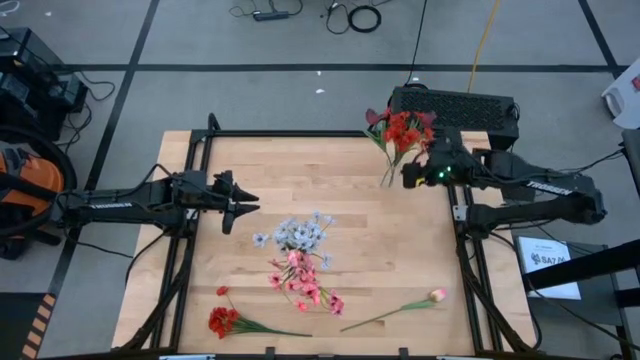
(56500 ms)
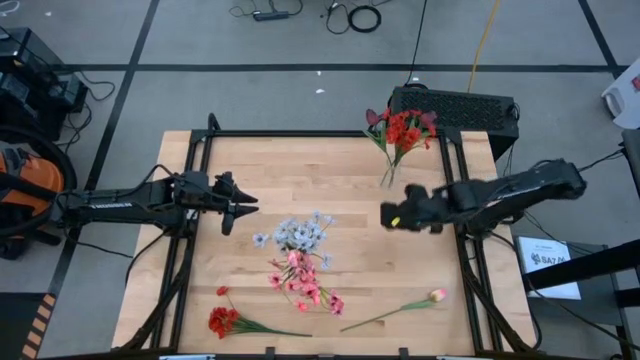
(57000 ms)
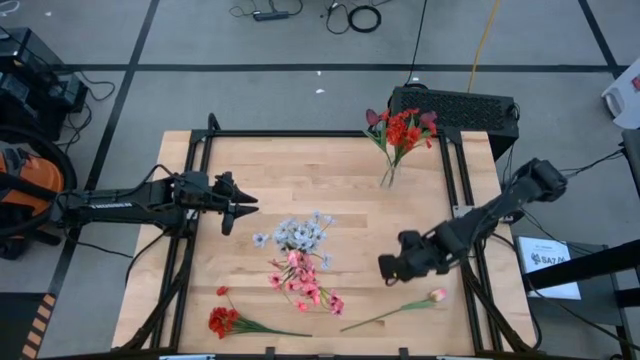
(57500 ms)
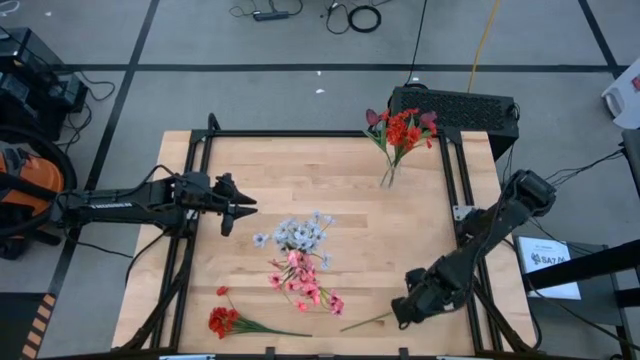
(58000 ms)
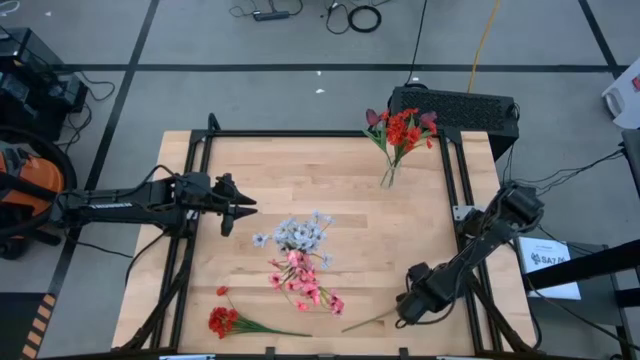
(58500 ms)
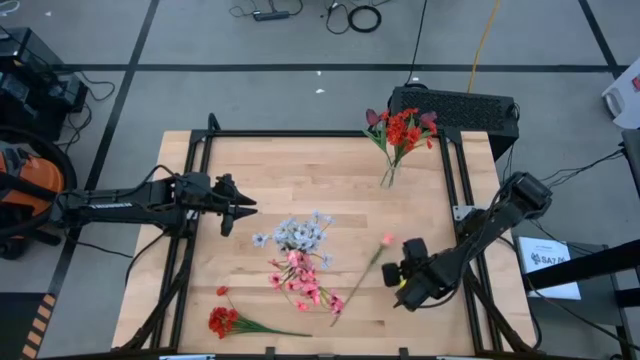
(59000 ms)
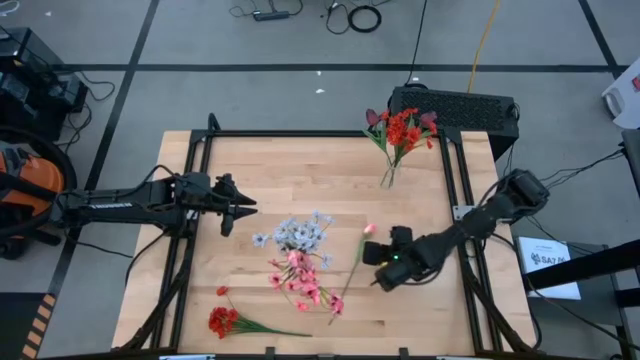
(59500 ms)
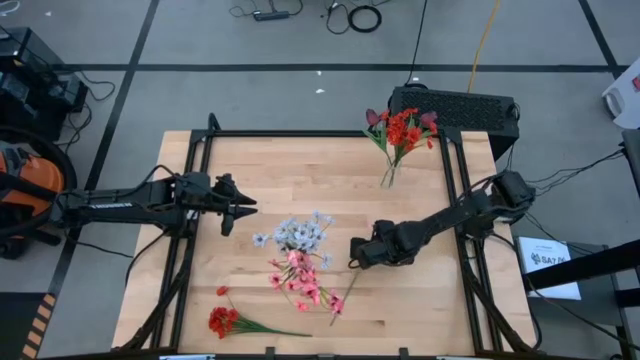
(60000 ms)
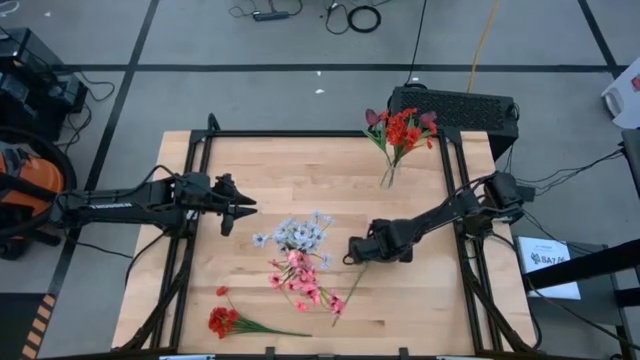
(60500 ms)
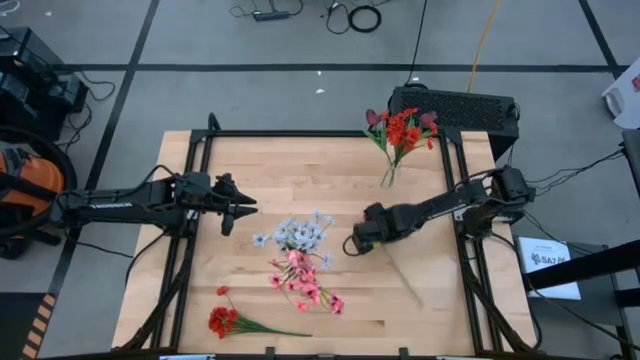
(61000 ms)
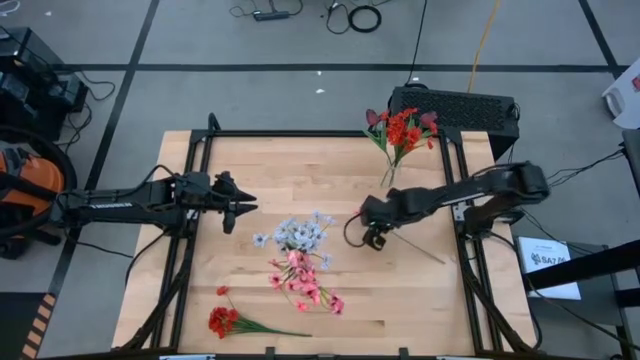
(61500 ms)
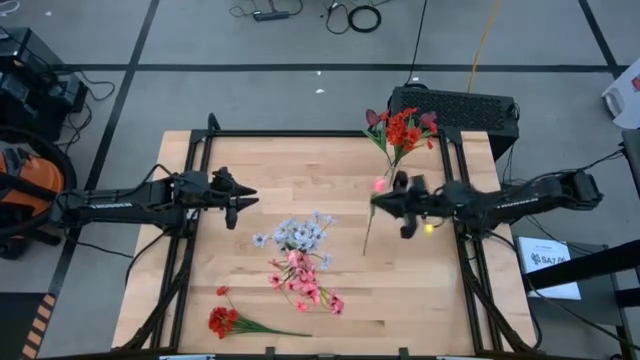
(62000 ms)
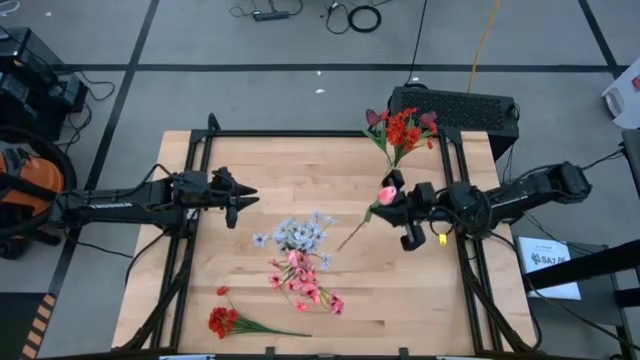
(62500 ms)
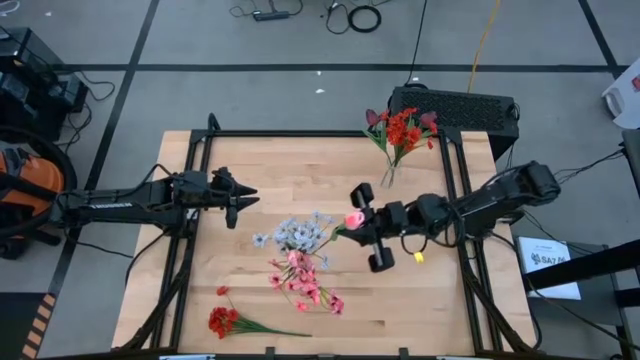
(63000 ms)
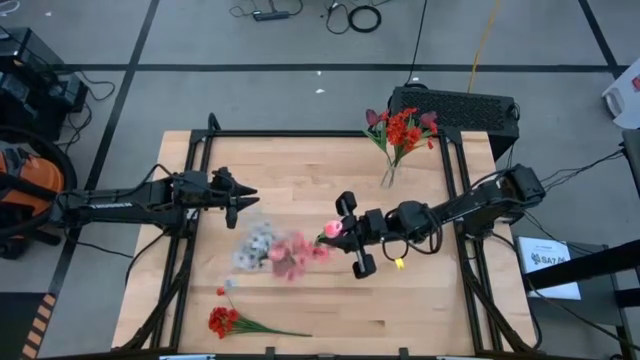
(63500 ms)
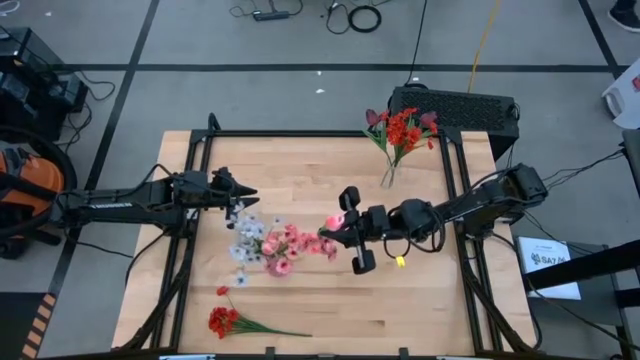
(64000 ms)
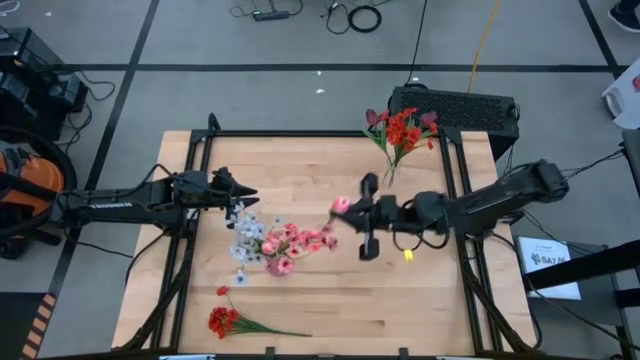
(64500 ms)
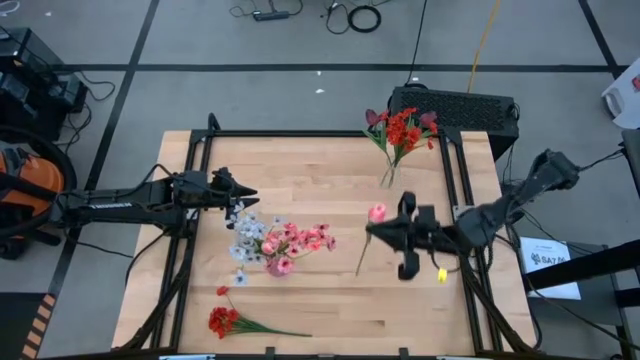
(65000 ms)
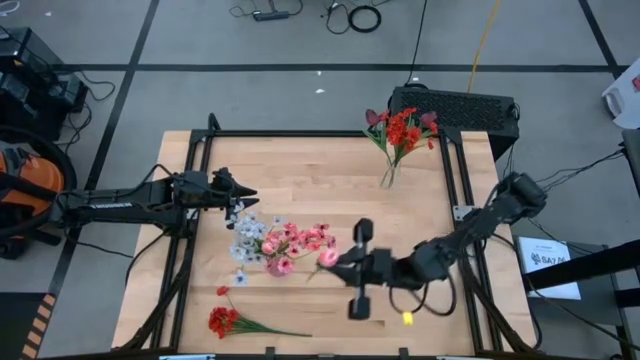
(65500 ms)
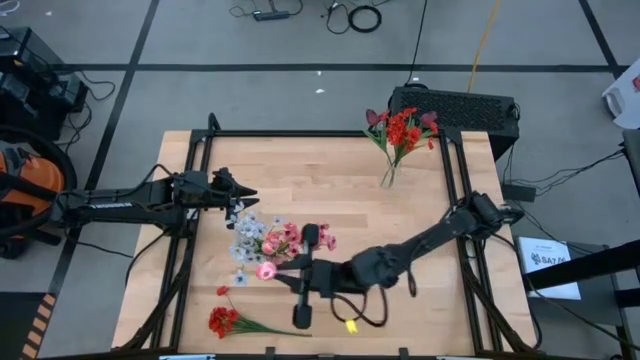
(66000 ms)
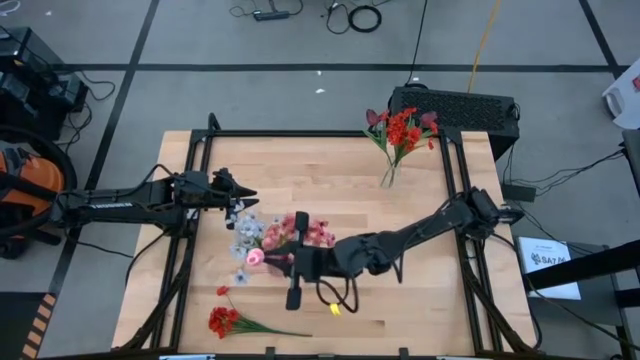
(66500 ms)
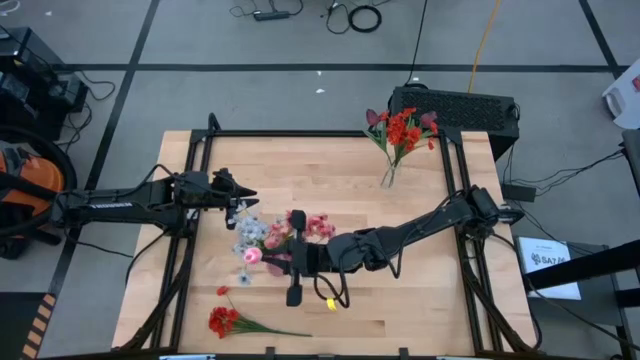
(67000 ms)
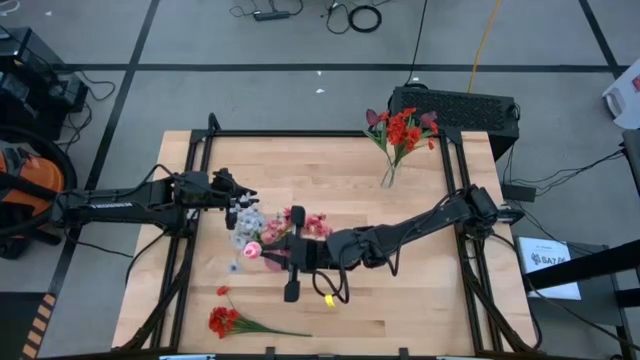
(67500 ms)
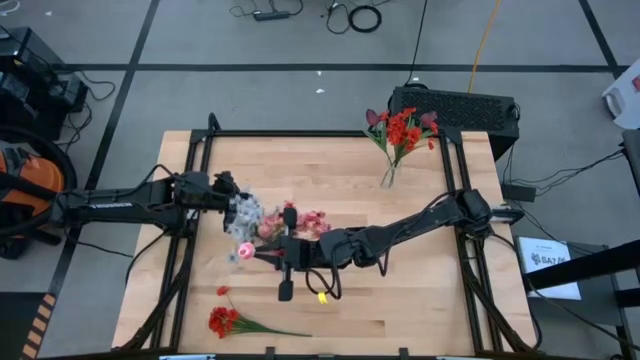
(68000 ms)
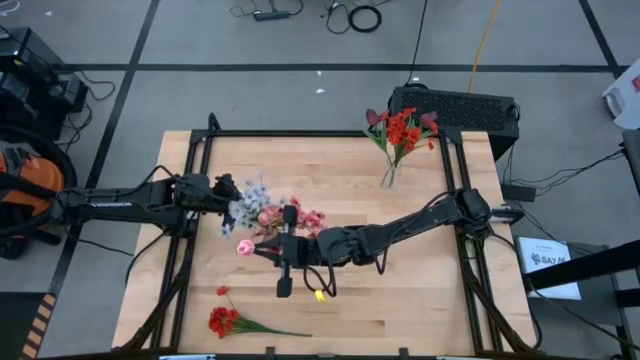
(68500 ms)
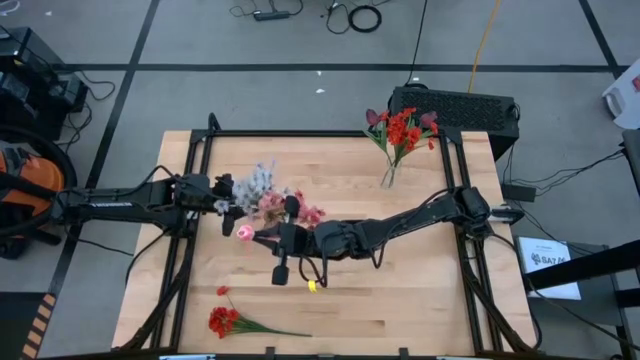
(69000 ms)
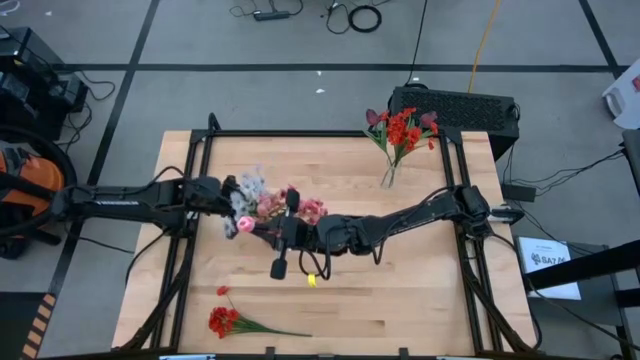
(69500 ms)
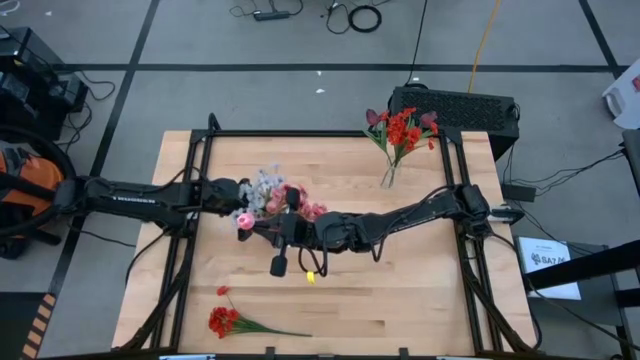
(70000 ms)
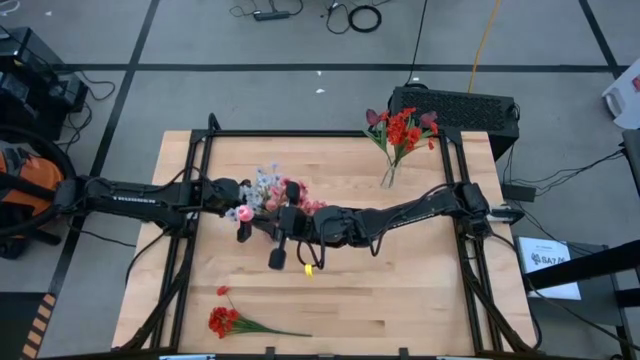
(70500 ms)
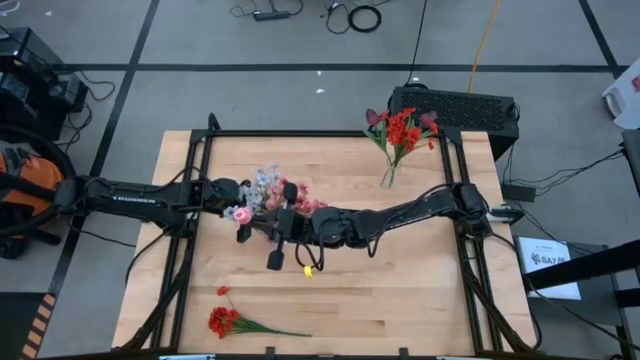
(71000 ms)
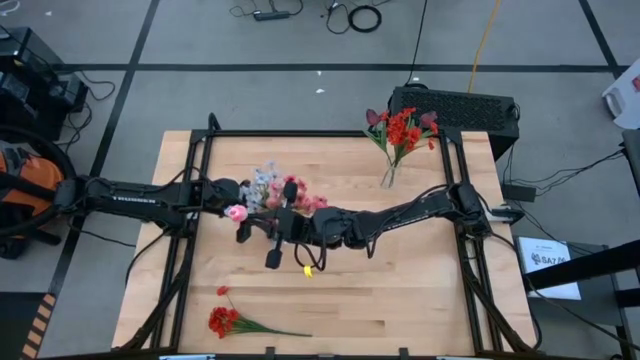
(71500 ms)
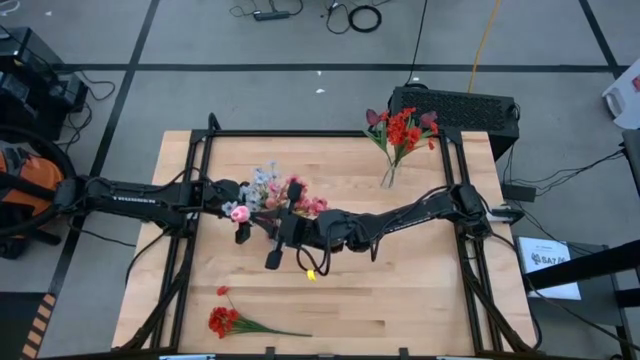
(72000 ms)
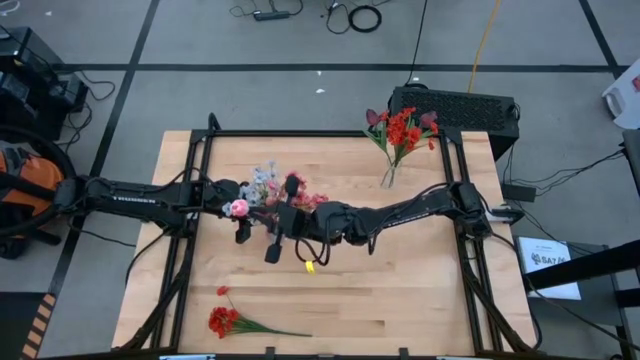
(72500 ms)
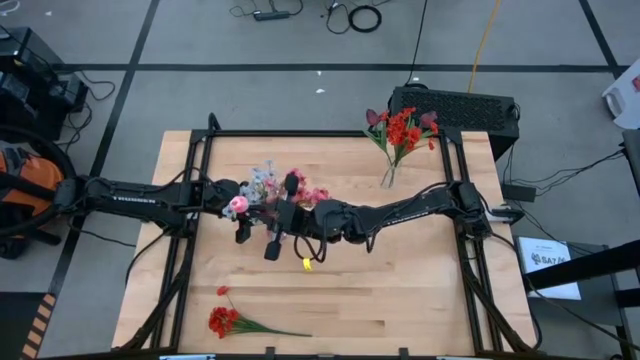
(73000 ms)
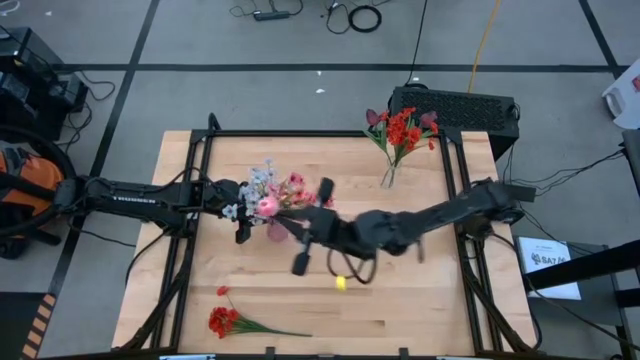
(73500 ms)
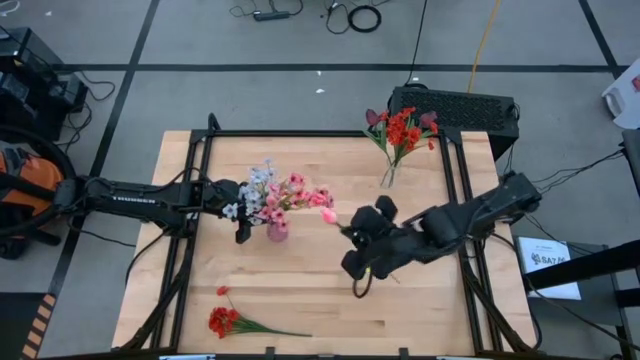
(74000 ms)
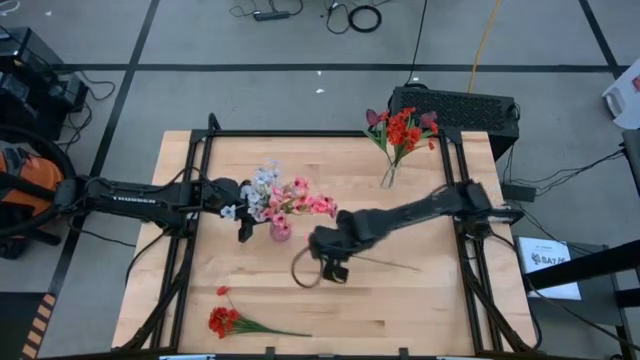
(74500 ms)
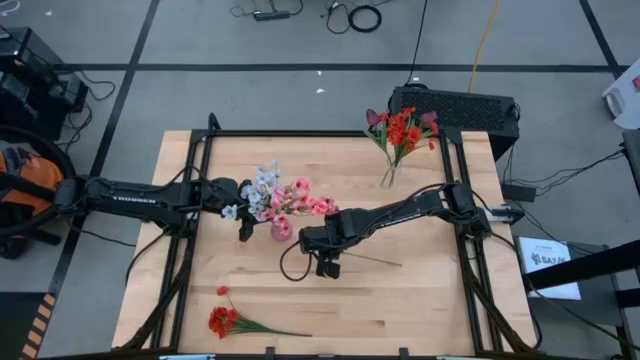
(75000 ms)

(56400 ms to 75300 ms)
Task: Sort flowers into vase by color
Put the pink flower into the purple vase

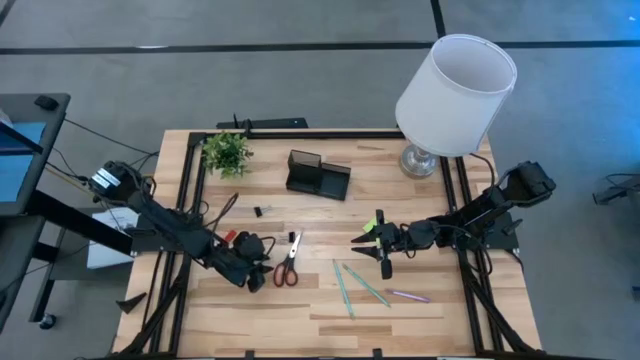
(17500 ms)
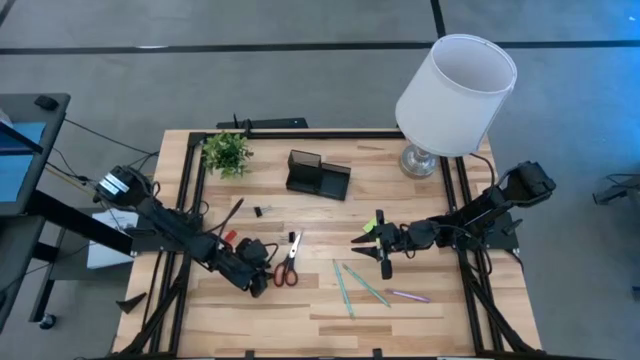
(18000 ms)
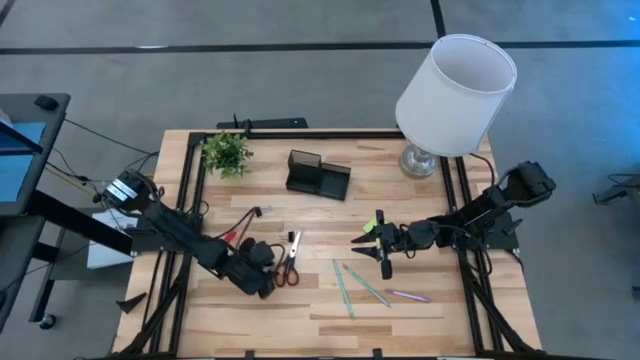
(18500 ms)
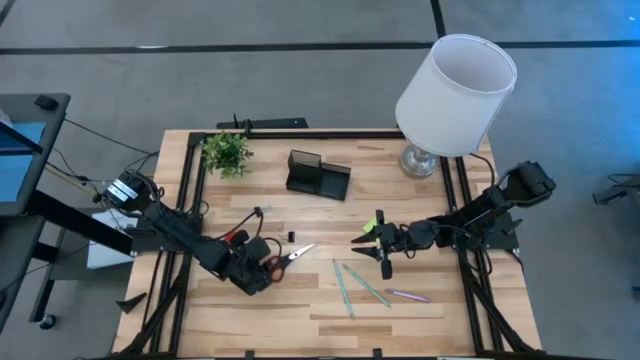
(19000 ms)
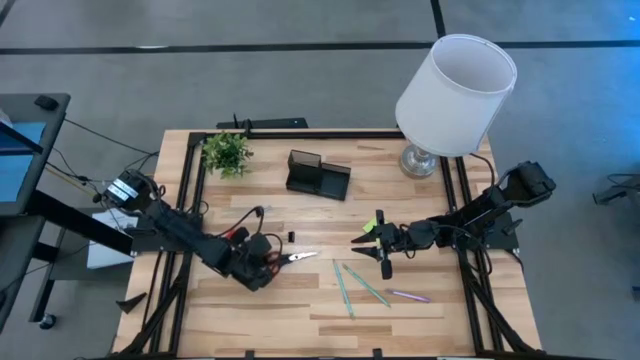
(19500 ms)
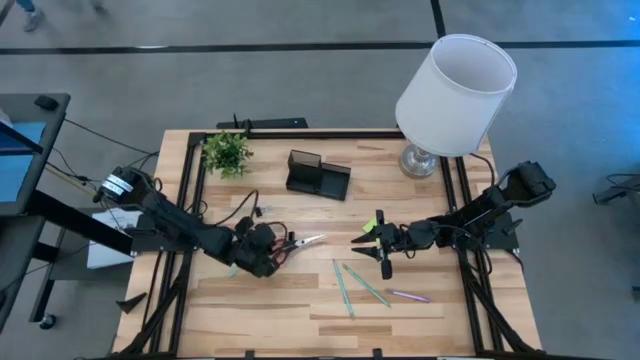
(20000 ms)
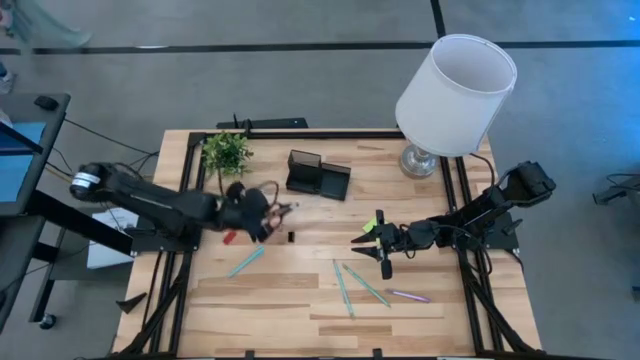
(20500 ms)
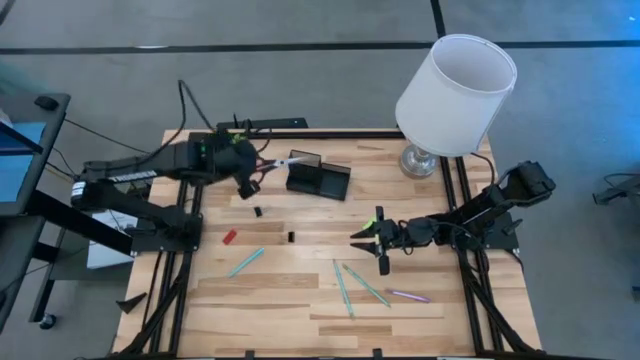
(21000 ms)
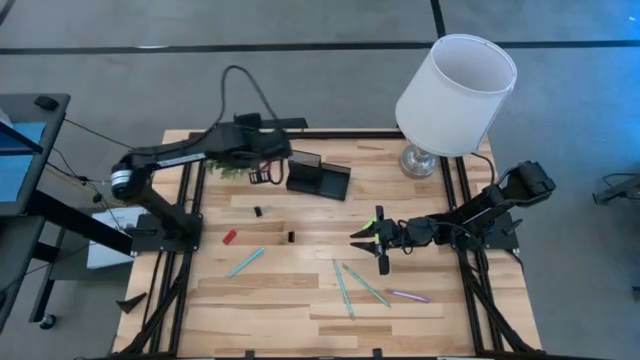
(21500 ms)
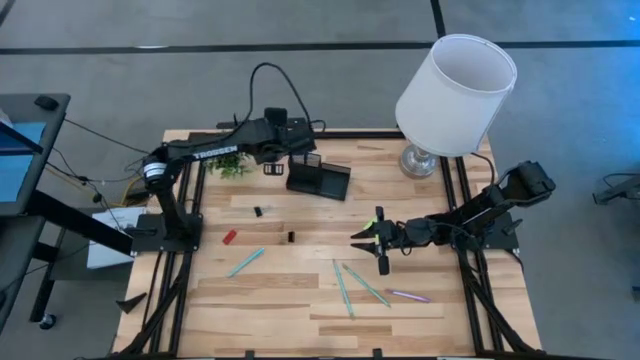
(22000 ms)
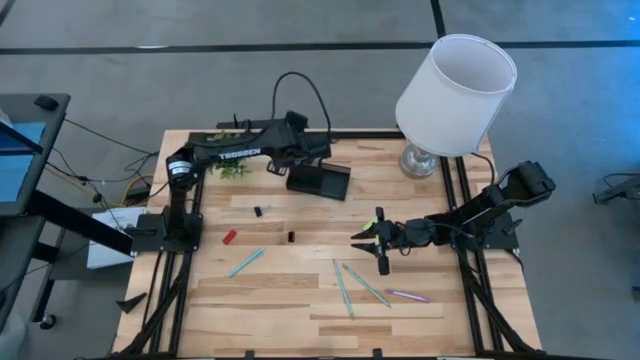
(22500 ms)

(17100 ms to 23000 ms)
Task: Pick and place office supplies into organizer
Put the black scissor into the desk organizer
